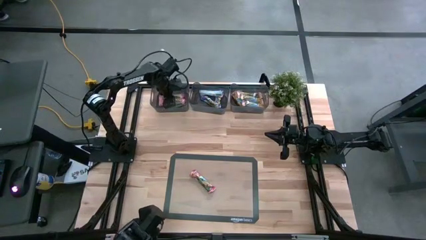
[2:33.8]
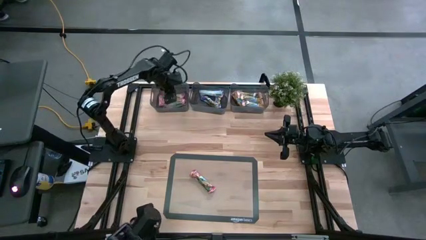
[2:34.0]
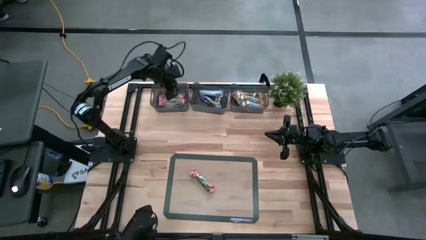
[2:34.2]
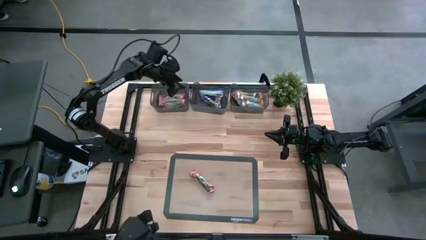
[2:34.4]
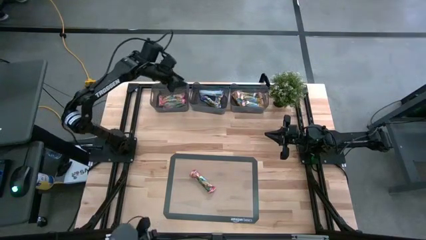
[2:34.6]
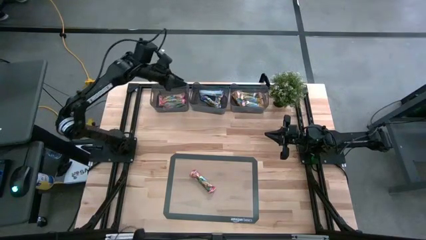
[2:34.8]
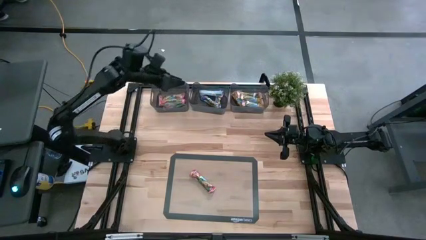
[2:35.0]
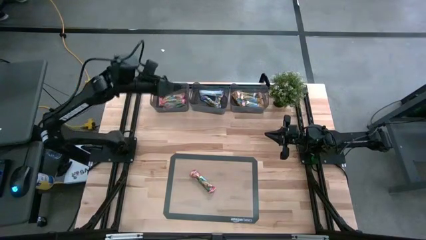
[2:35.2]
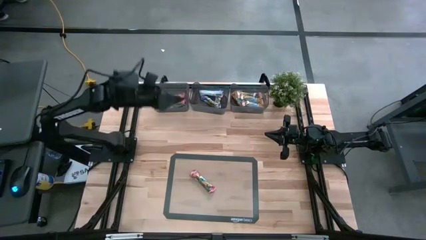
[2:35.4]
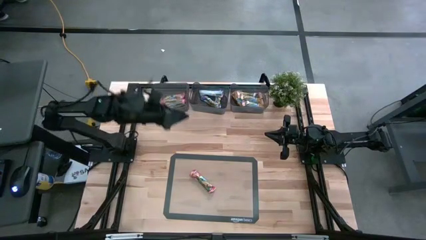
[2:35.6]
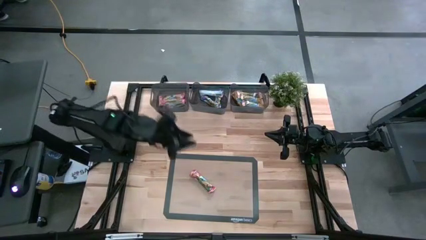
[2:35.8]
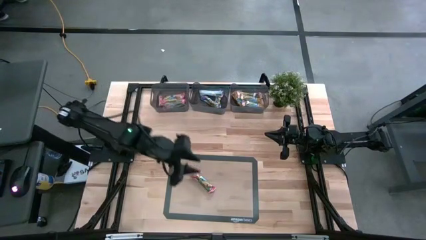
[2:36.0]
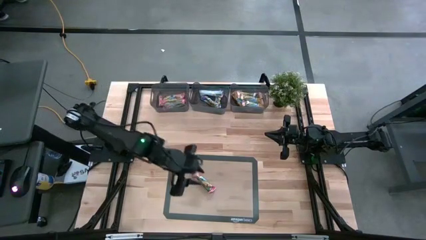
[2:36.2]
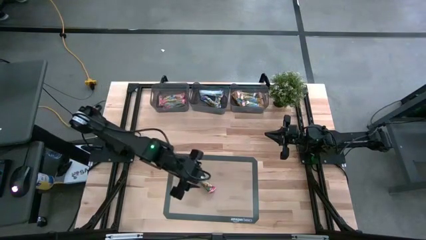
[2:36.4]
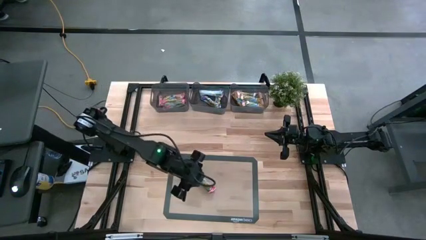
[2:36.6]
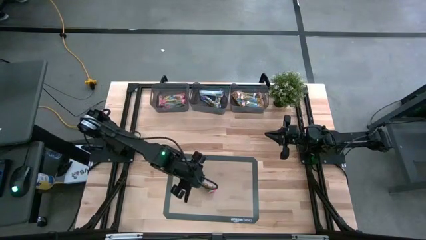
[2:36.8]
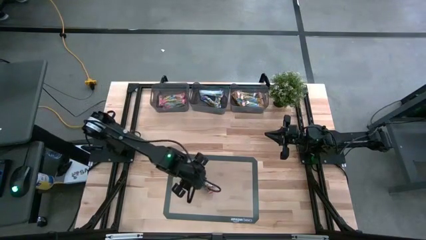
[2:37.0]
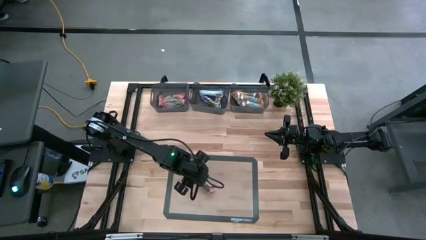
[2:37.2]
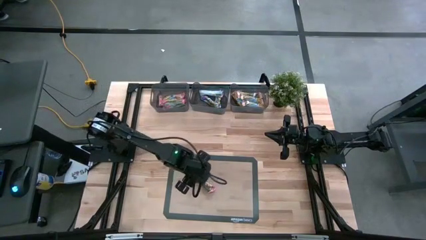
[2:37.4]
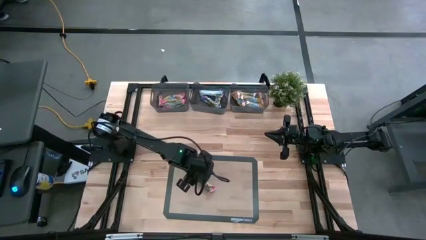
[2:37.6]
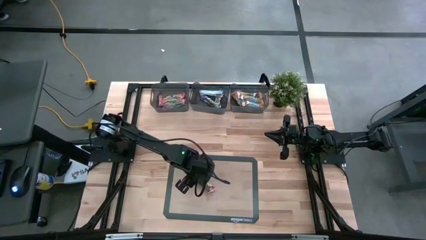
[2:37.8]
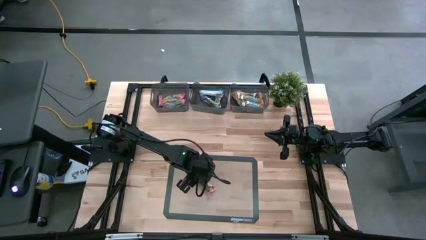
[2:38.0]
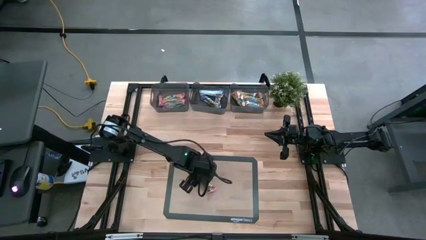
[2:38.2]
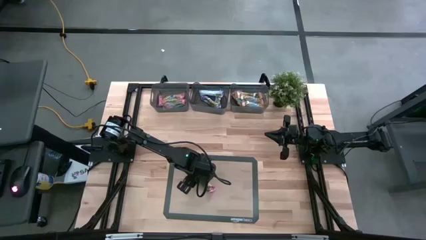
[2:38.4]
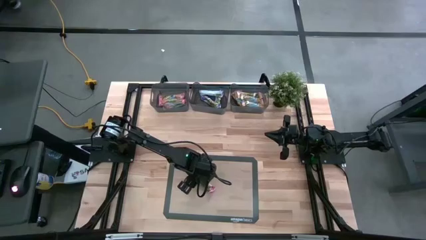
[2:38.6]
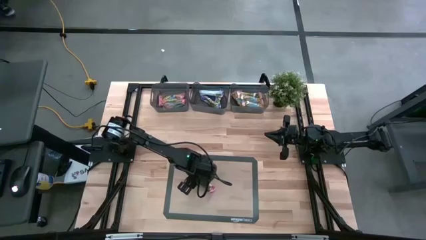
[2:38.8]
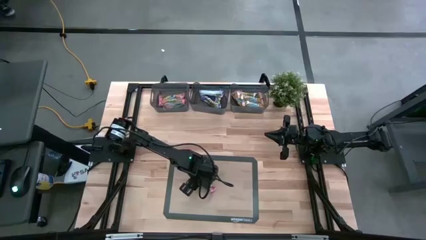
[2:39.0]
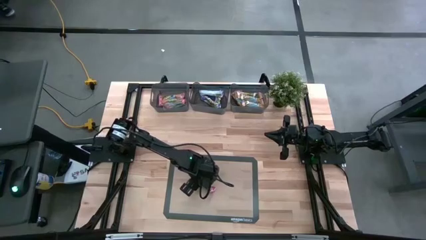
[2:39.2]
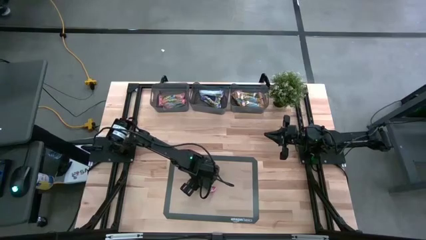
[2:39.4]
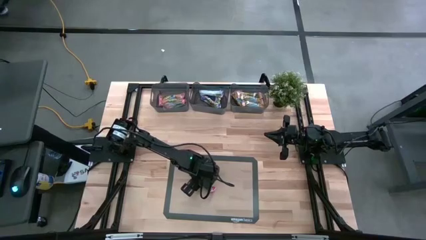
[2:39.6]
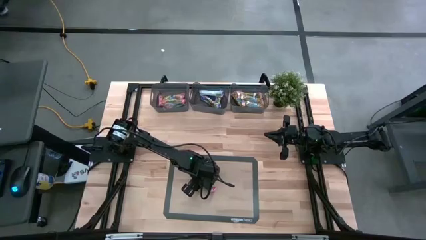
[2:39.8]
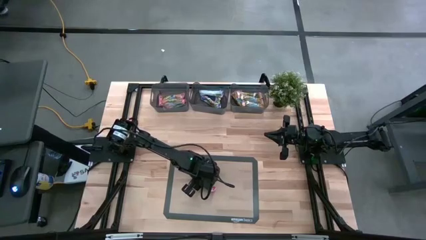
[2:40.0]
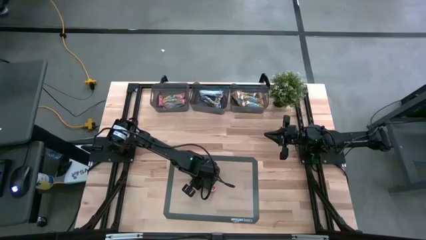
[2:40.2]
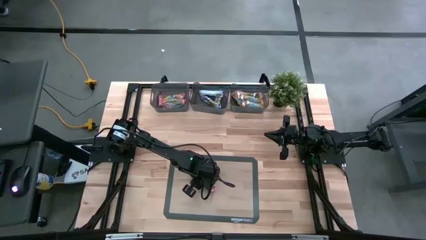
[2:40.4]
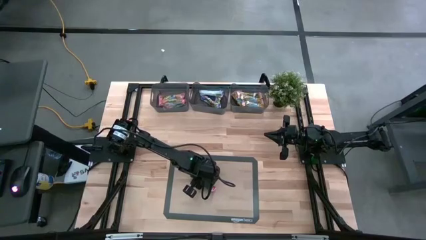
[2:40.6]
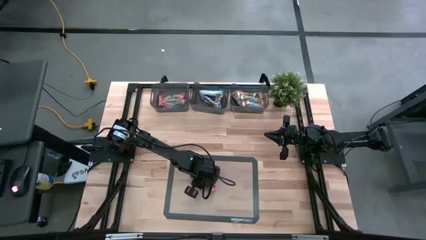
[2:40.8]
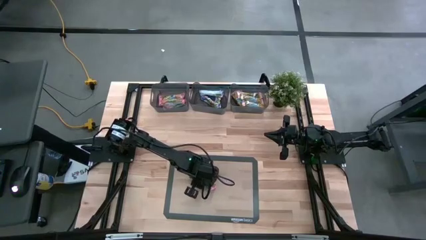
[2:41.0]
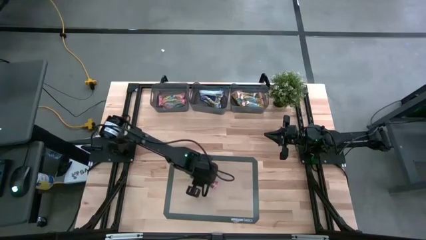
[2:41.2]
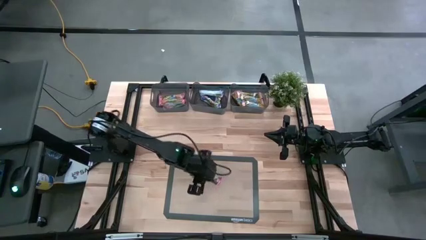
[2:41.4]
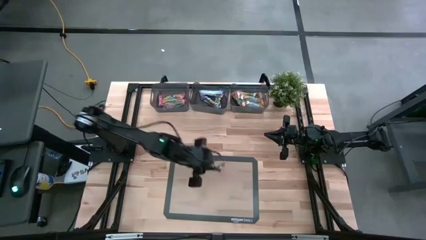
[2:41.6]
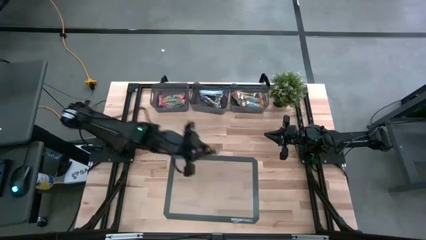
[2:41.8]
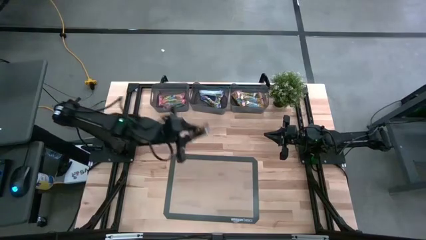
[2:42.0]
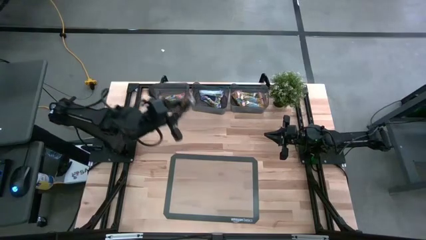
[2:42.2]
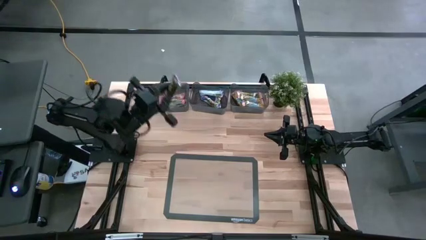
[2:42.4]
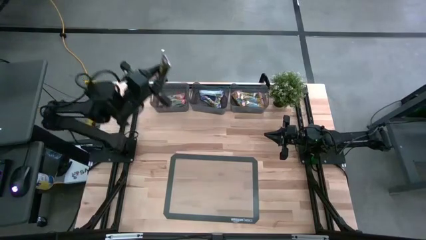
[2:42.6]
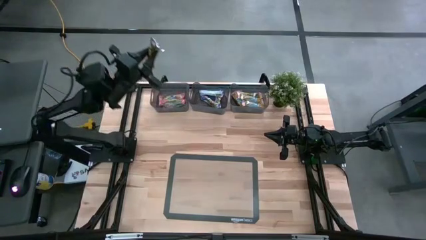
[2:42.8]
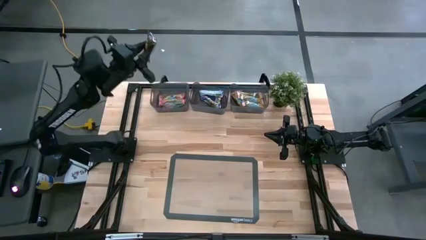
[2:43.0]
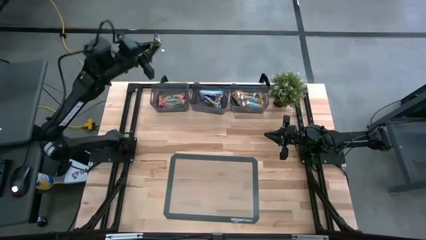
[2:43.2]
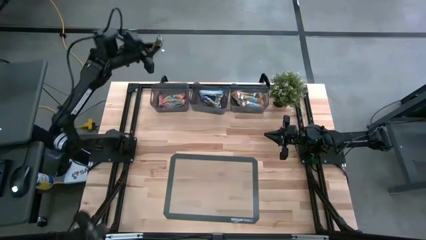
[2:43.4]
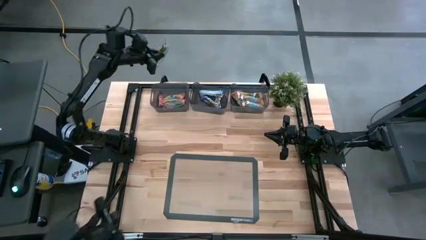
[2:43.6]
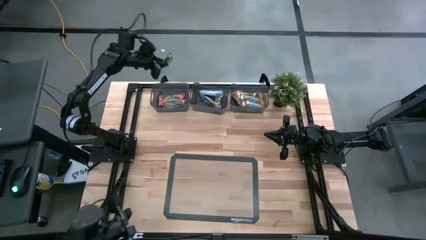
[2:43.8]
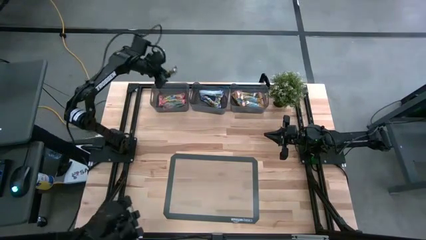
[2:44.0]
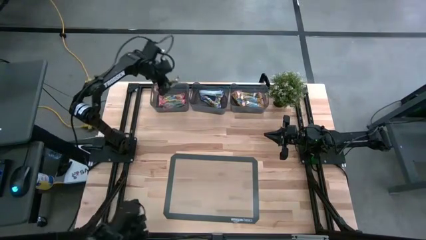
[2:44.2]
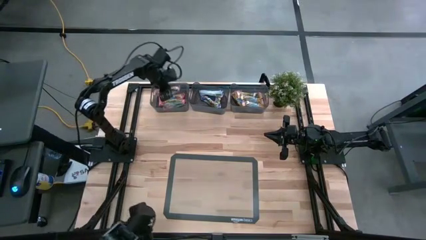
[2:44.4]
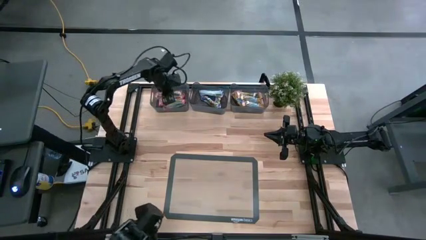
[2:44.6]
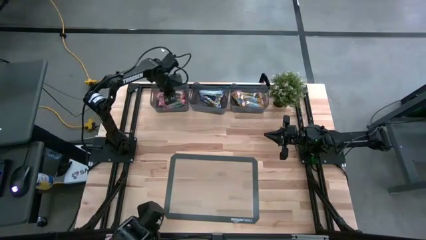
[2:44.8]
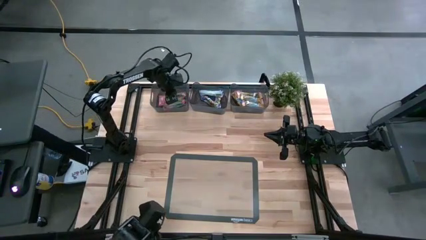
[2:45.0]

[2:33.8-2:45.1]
Task: Pick and place Granola Bars by type
Put the red granola bar into the left black bin

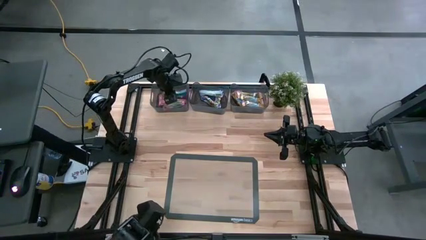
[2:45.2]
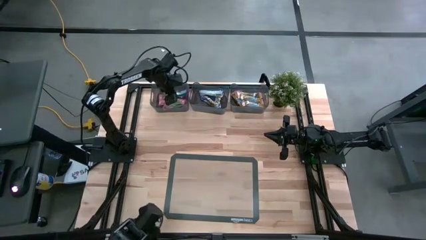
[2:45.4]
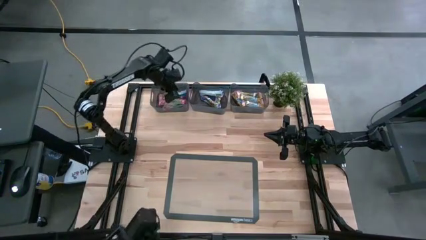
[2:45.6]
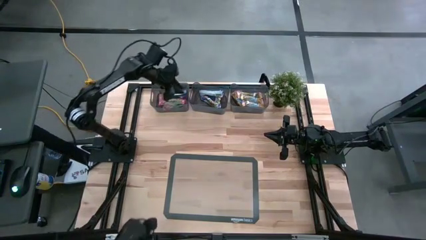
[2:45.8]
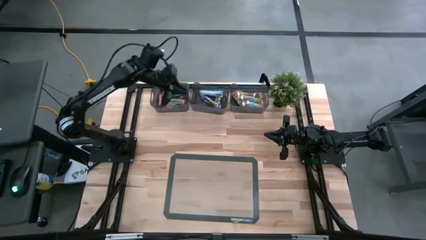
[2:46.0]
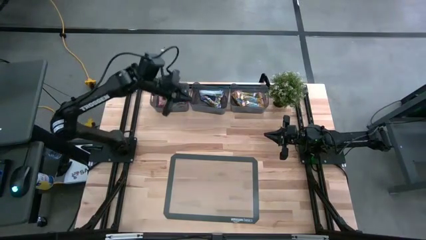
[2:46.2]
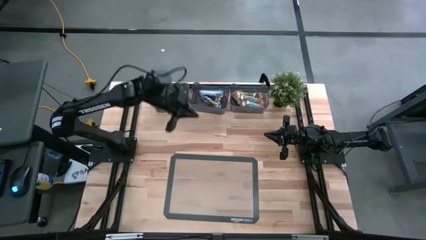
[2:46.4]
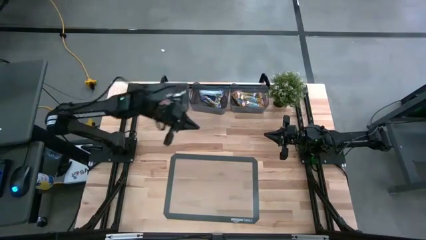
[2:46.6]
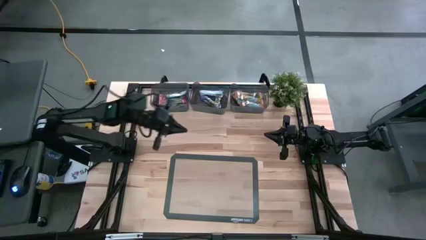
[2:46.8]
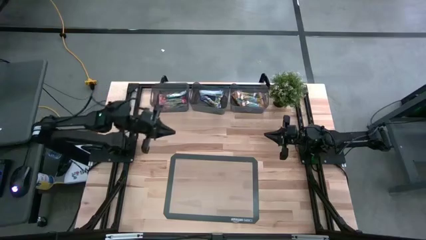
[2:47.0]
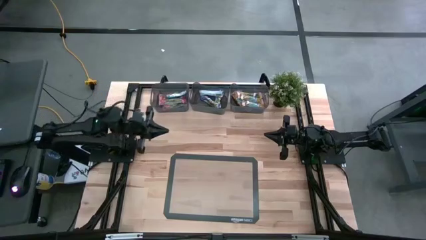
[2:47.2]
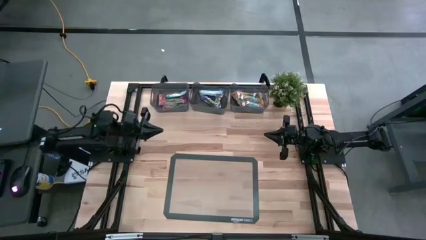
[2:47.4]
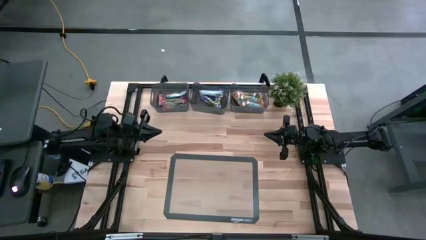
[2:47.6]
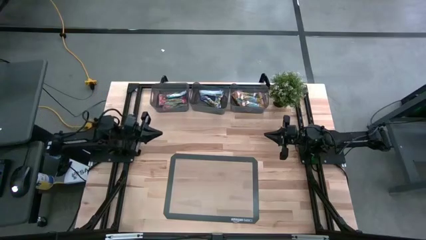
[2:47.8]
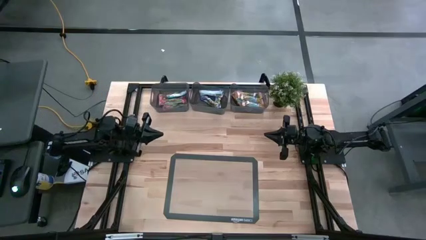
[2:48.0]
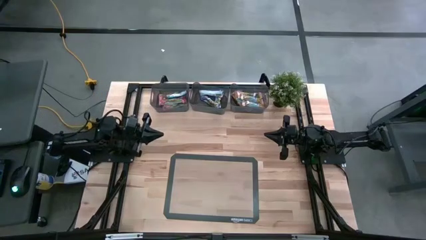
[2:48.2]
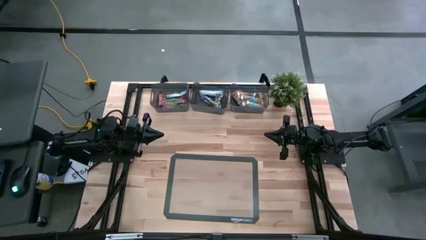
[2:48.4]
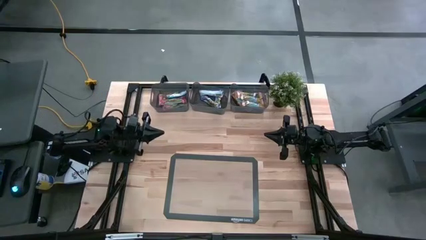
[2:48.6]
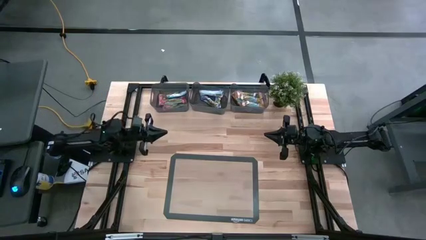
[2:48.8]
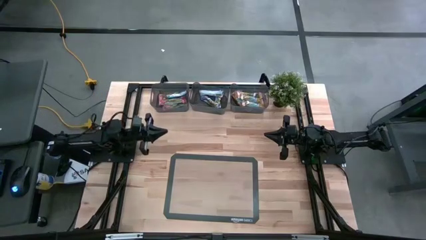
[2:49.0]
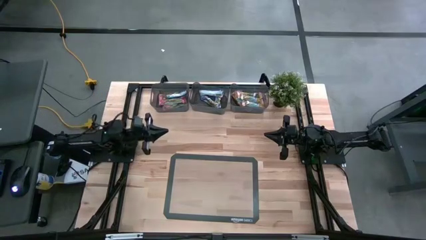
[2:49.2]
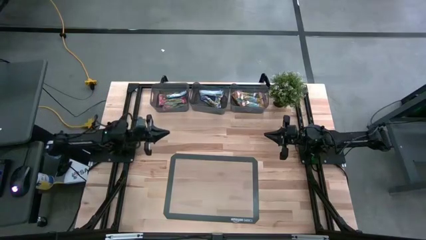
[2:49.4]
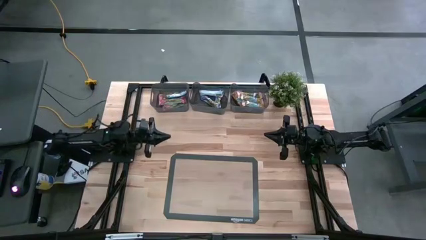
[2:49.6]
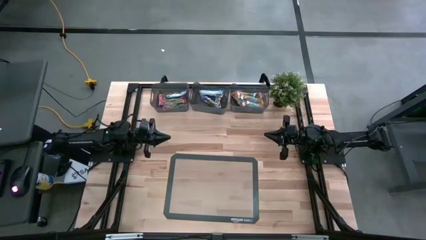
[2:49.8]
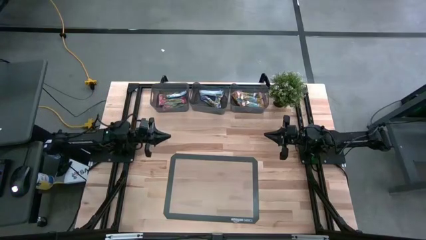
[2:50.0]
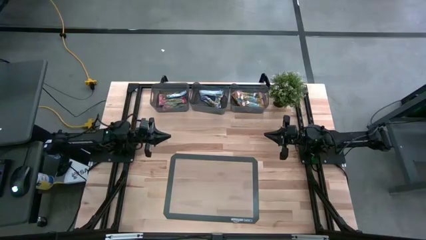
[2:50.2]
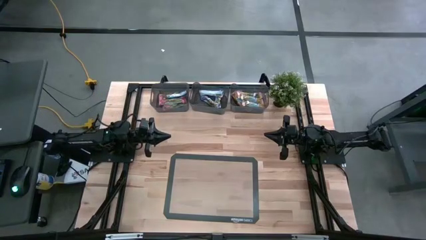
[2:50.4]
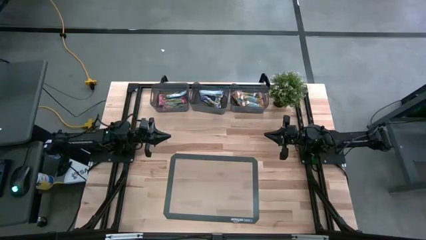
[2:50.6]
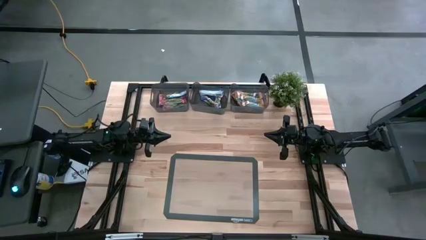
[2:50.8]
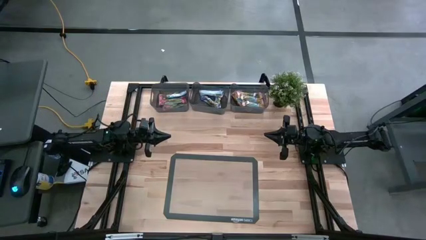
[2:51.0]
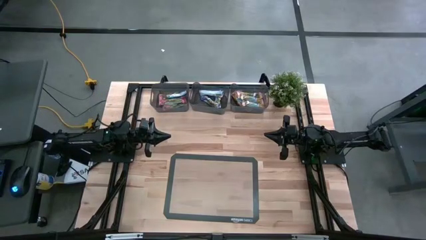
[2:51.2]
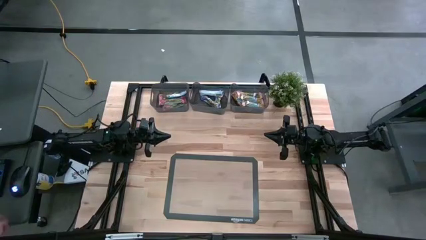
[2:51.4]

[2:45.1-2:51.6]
Return to Home Position
